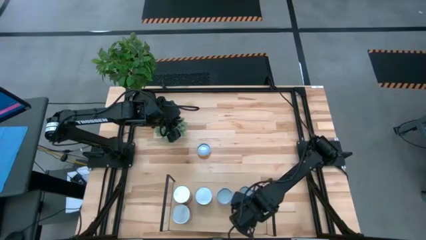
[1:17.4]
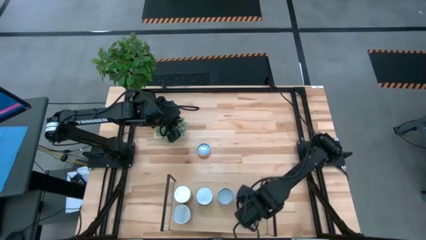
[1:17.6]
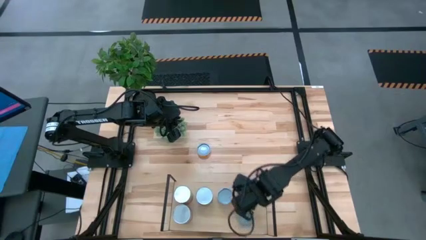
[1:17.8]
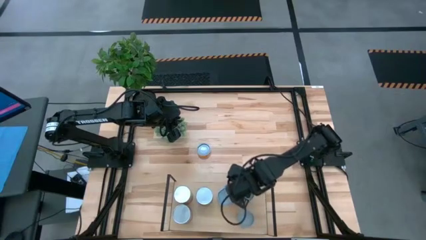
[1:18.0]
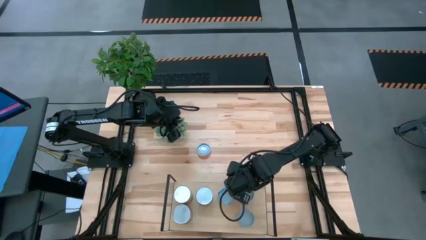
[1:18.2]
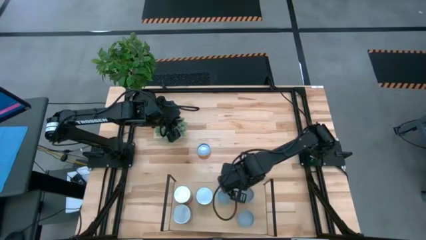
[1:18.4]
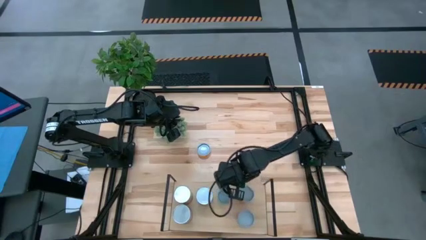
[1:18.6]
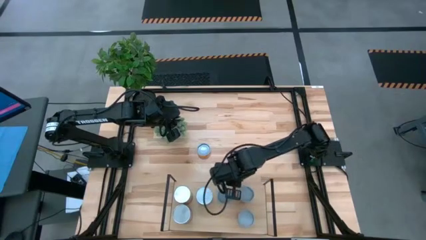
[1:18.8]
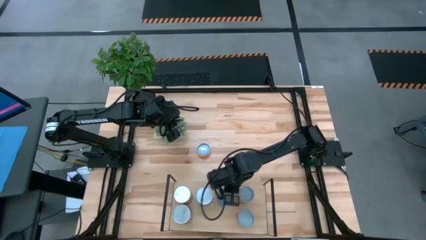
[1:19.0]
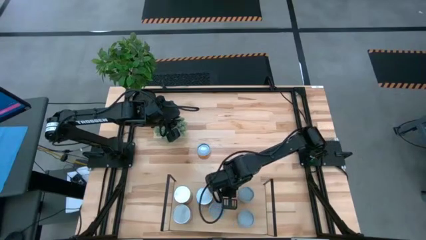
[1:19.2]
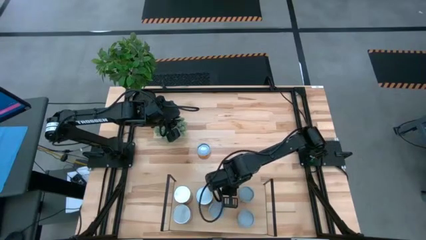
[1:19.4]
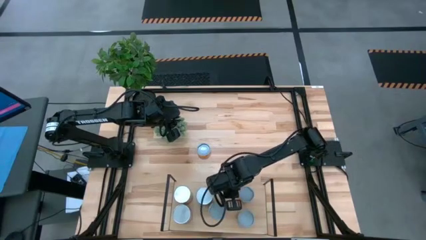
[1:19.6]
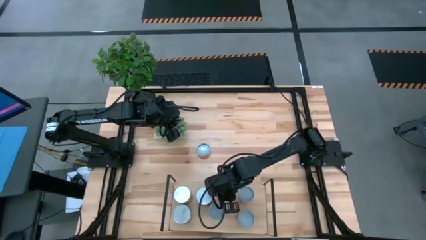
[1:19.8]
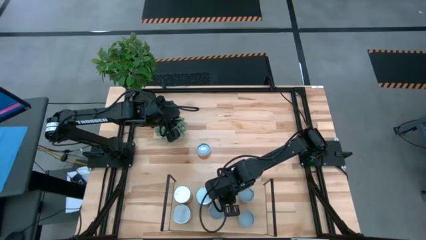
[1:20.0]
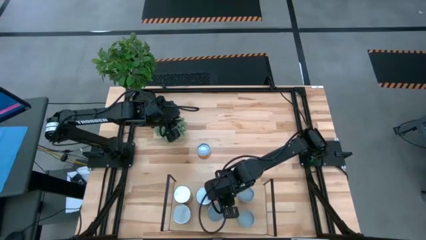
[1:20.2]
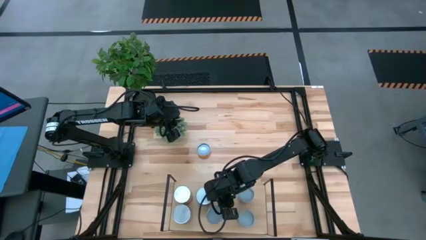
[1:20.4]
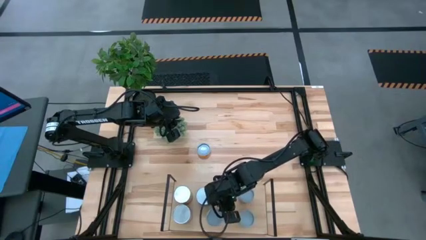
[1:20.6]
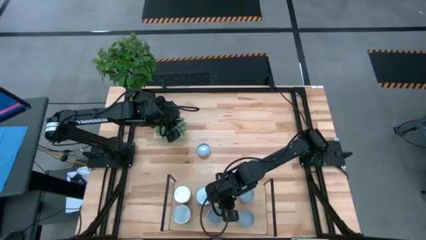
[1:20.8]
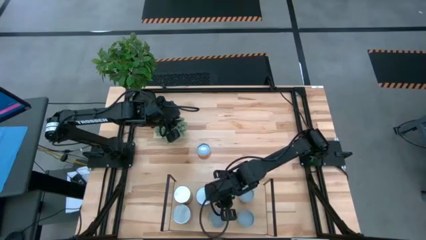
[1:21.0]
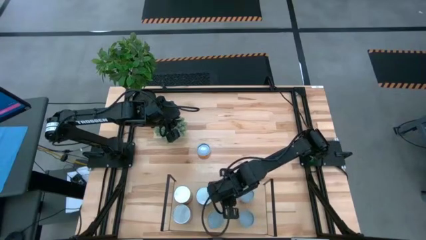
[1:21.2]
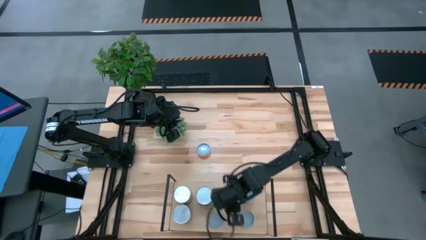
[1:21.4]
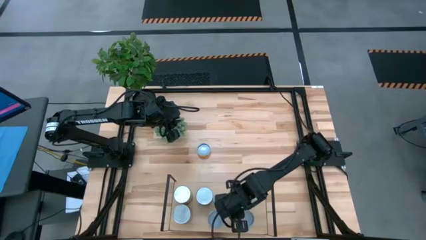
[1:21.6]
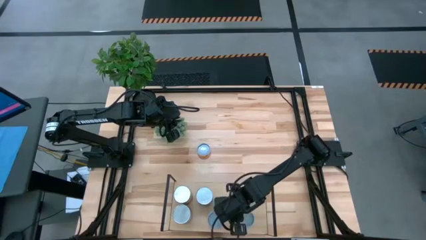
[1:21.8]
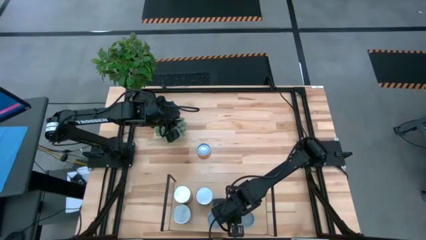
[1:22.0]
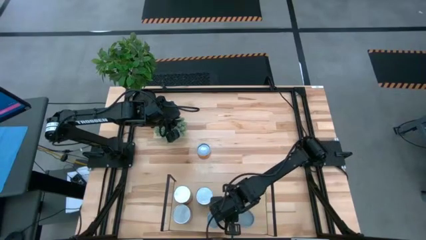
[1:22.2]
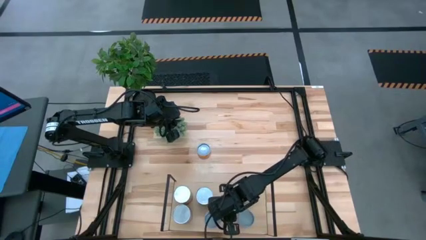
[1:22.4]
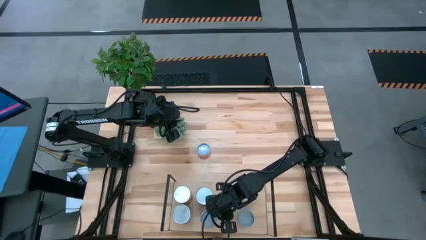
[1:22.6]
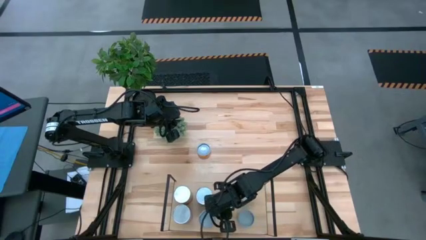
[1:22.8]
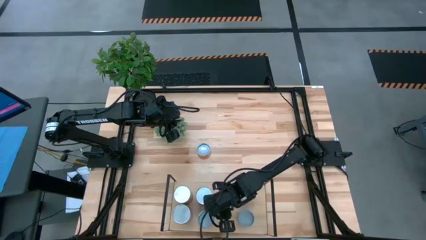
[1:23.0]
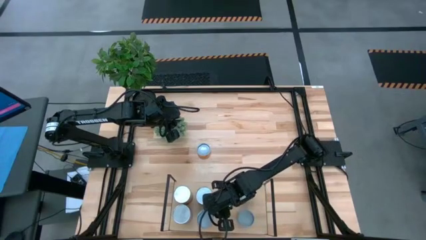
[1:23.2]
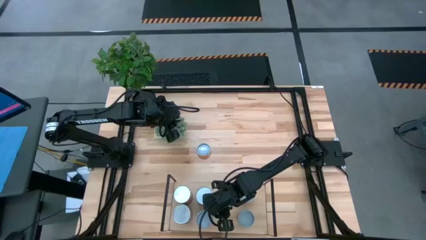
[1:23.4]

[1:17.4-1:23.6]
Task: Pick and place cans onto a shelf
Adjust the canned mixed fruit

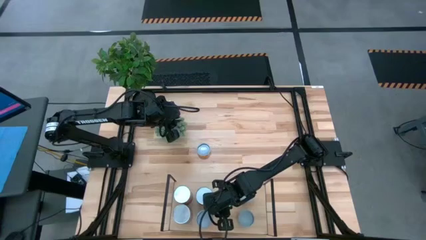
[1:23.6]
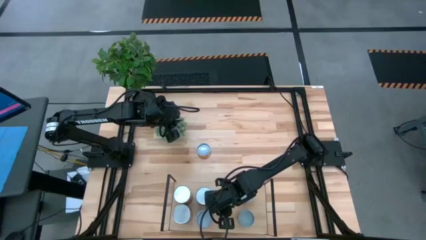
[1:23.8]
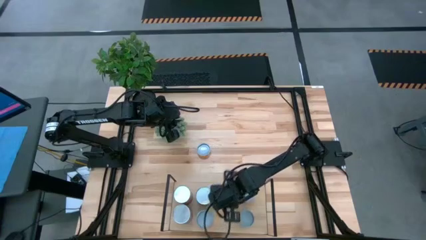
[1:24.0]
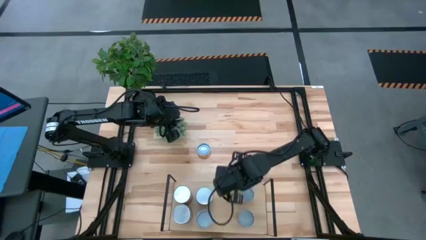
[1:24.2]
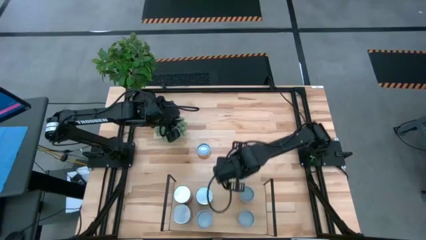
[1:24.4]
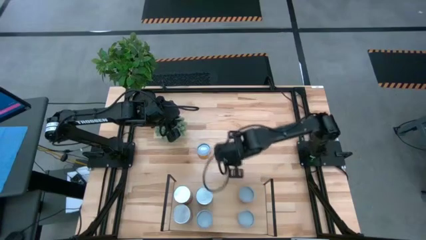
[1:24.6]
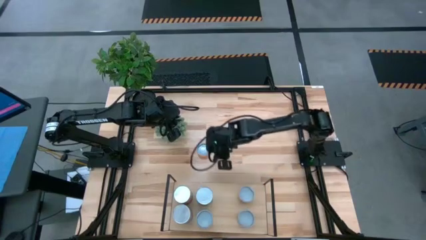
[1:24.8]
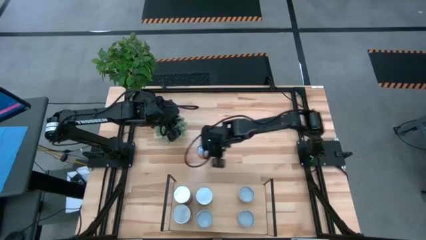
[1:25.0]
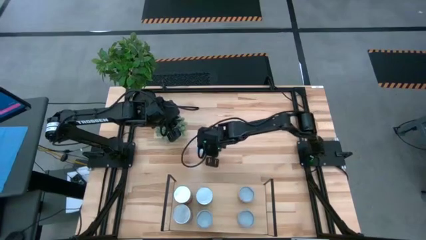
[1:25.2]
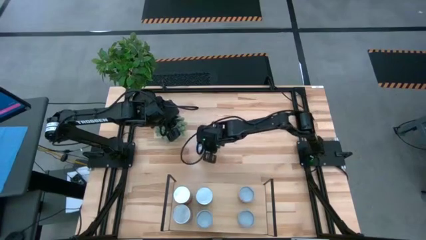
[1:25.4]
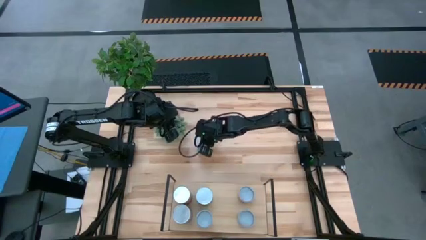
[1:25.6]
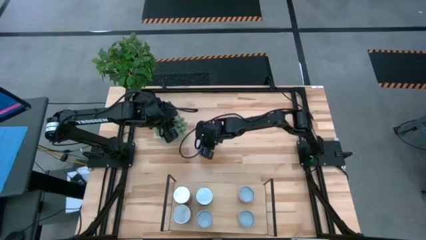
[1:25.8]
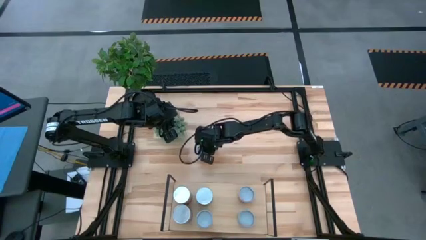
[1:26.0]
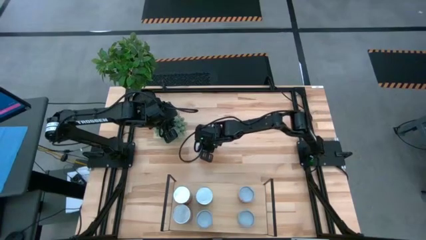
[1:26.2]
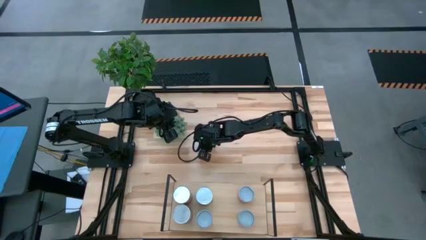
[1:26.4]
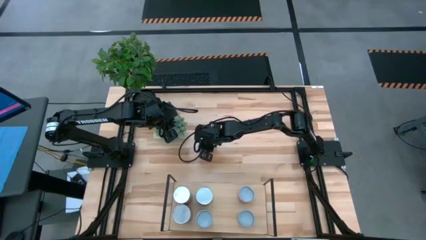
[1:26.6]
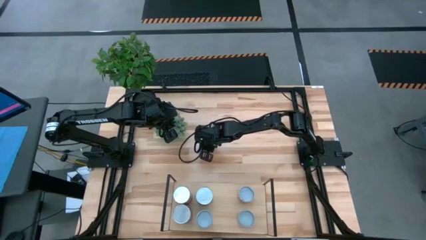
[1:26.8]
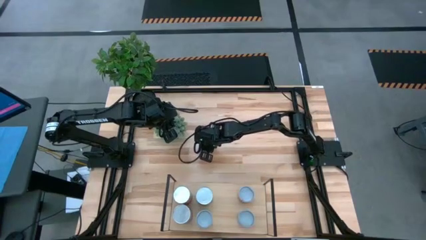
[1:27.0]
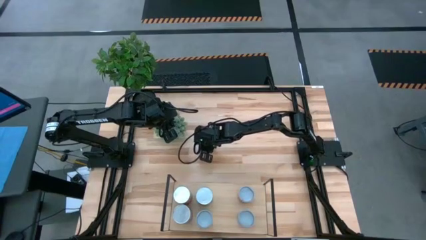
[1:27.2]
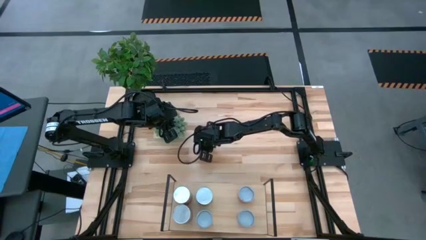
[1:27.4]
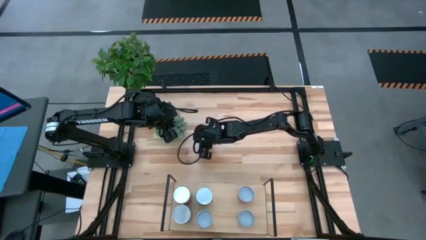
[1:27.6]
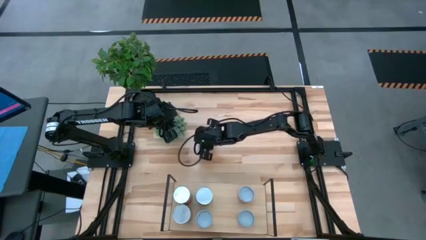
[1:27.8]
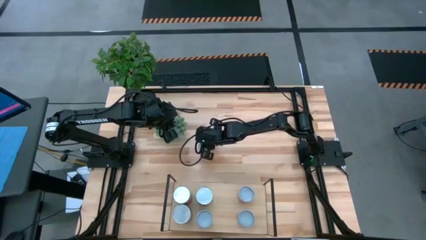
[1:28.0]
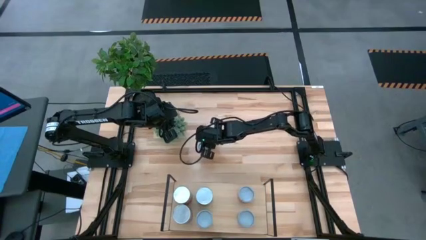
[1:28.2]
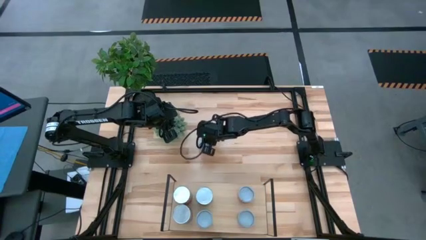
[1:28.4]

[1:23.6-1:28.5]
Put the canned pineapple on the shelf

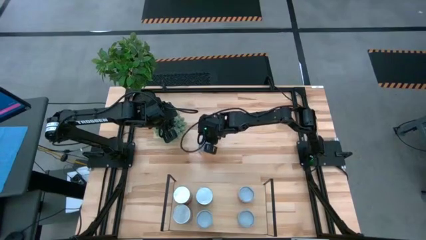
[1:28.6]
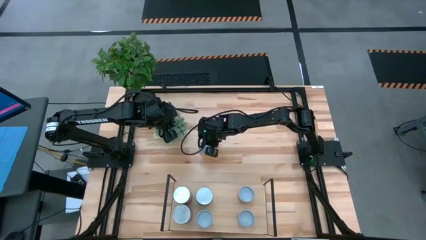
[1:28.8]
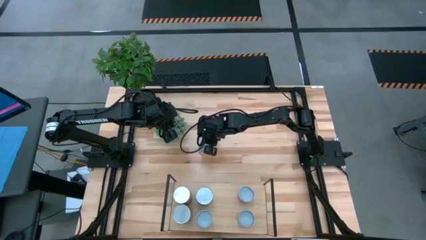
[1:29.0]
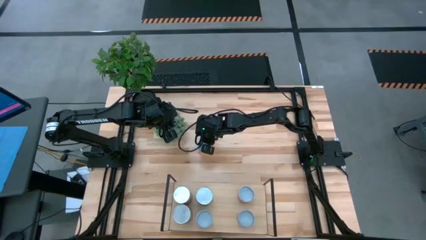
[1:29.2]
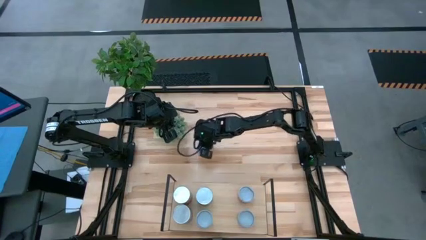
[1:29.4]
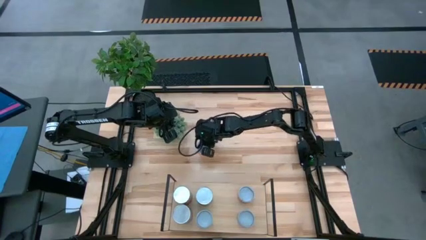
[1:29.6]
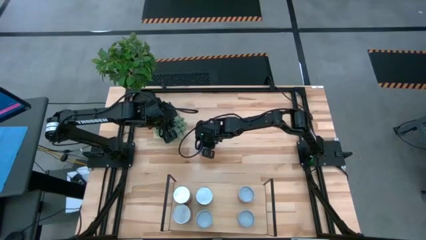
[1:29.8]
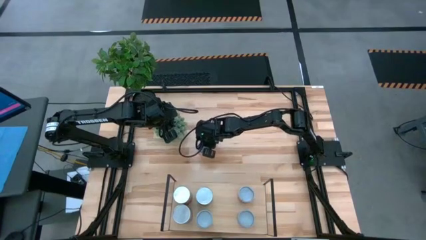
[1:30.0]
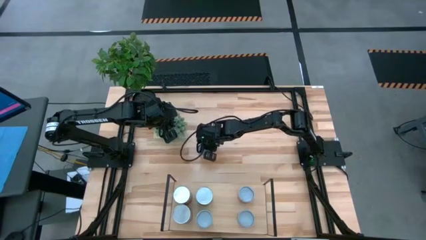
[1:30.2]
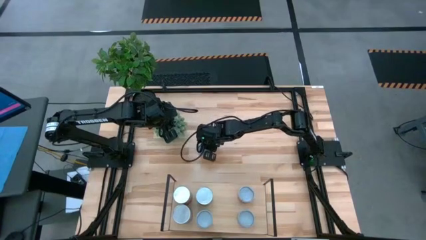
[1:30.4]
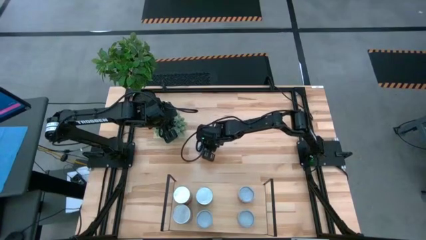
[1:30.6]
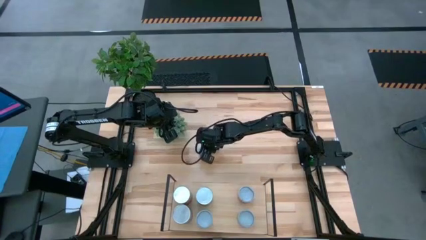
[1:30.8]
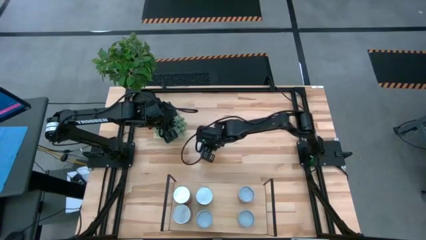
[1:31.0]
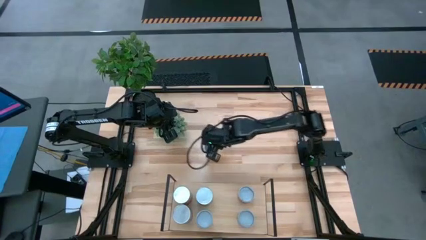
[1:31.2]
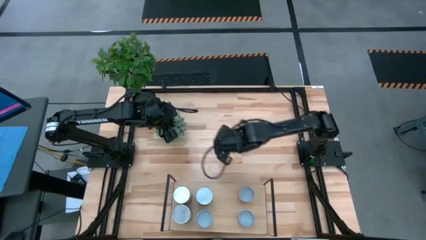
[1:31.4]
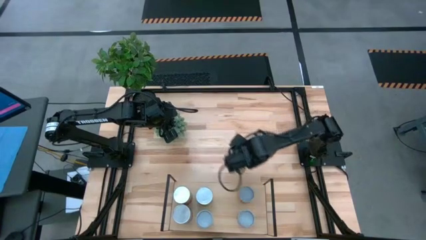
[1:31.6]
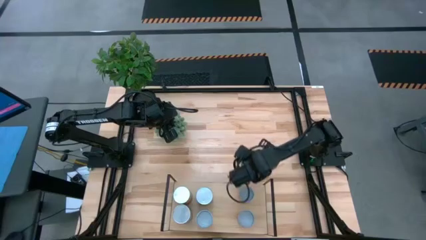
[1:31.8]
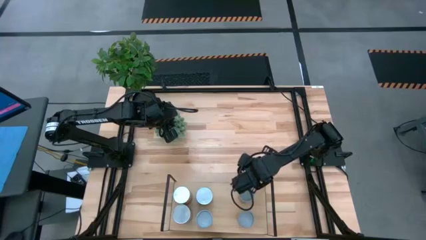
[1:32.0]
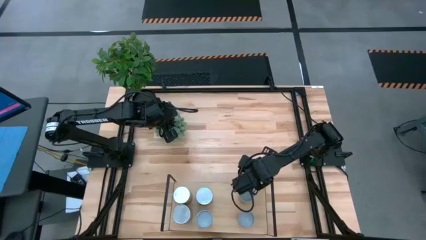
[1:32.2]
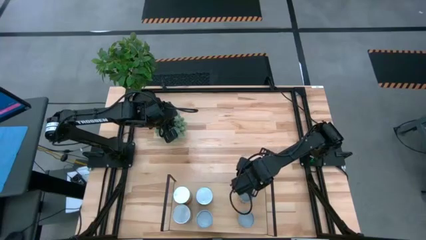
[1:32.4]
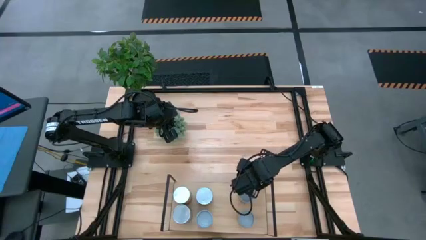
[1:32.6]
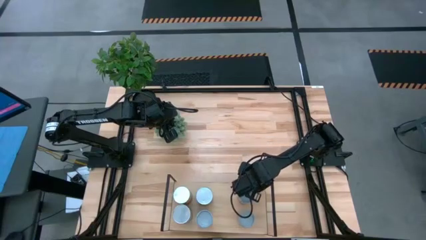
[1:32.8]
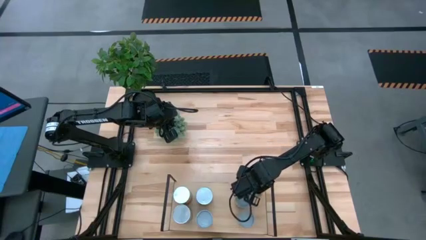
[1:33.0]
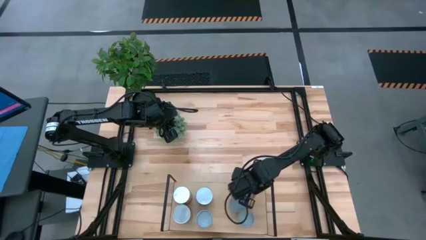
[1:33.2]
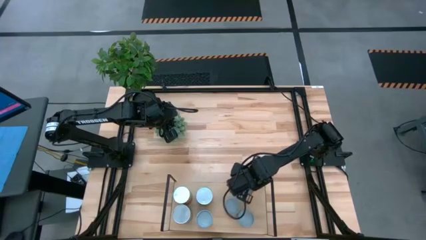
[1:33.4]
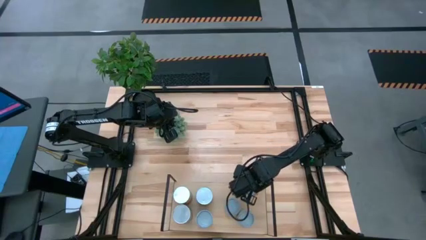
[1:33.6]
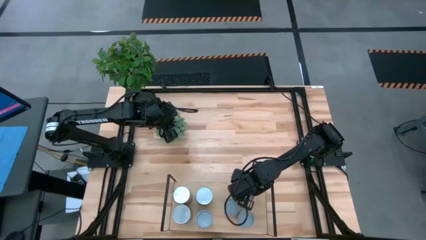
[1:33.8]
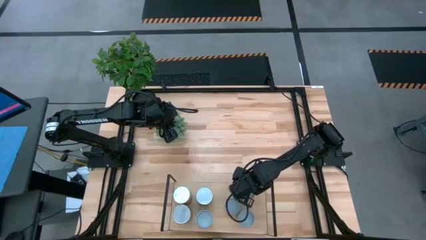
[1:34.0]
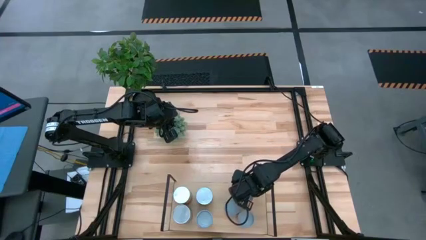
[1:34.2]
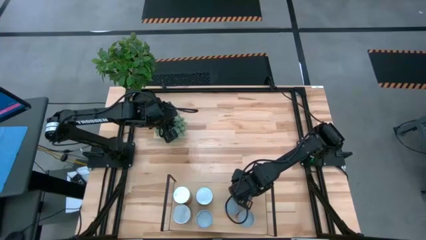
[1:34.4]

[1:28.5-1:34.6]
Put the canned pineapple on the shelf
